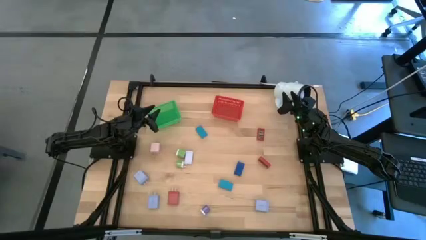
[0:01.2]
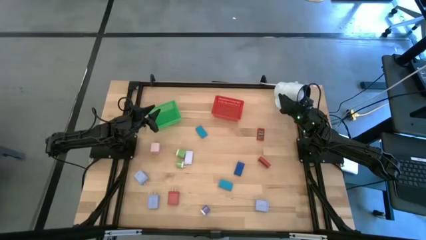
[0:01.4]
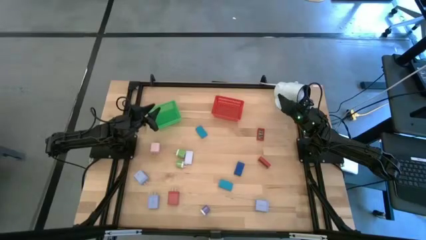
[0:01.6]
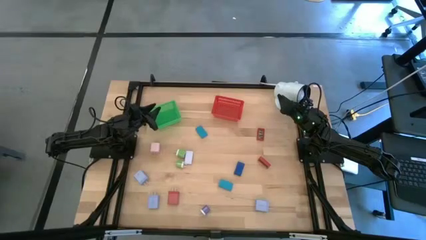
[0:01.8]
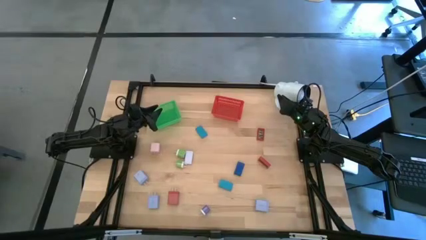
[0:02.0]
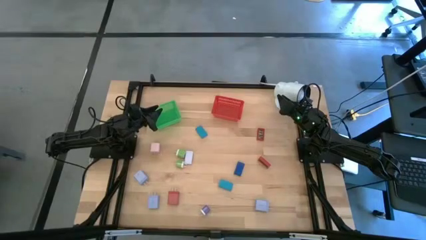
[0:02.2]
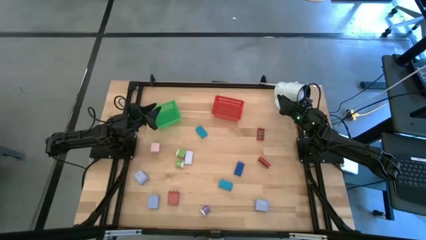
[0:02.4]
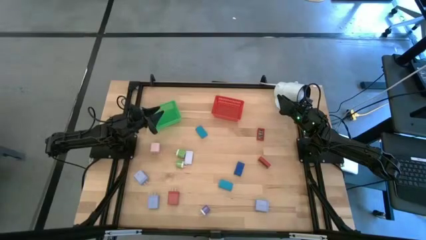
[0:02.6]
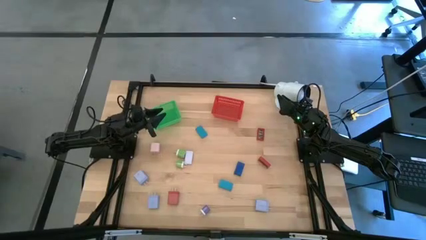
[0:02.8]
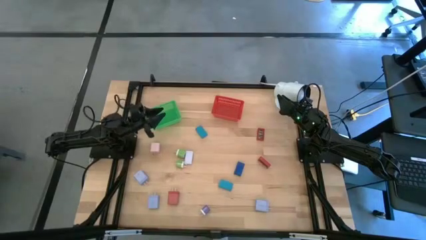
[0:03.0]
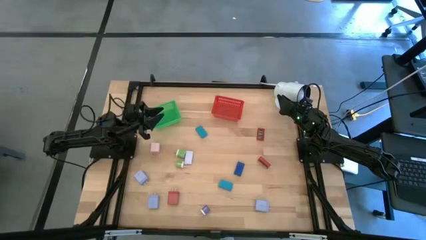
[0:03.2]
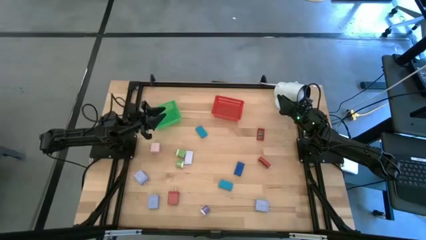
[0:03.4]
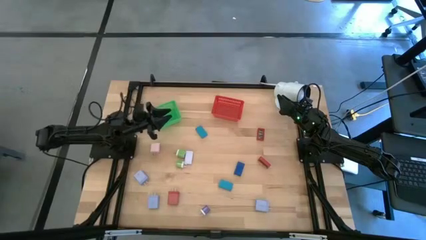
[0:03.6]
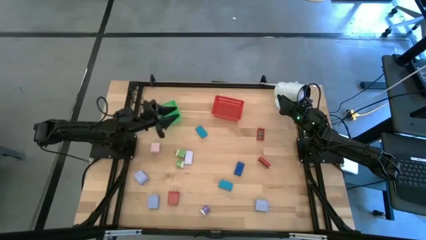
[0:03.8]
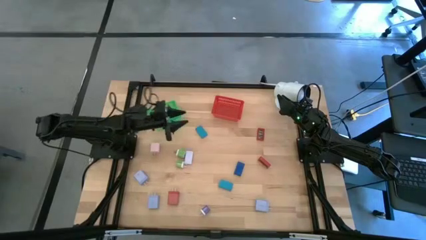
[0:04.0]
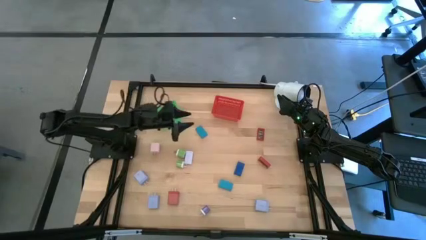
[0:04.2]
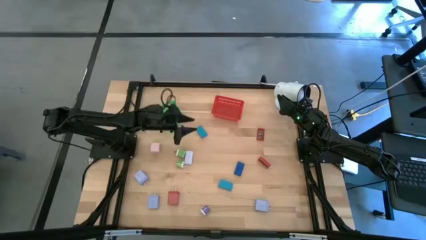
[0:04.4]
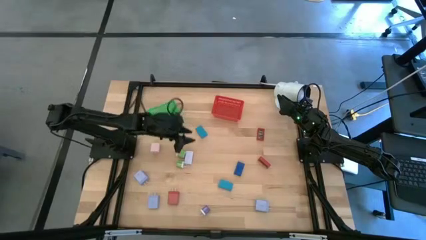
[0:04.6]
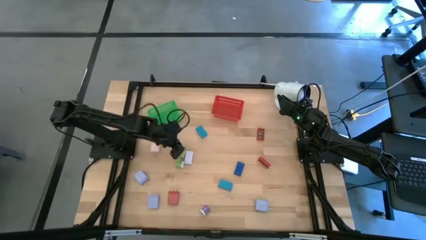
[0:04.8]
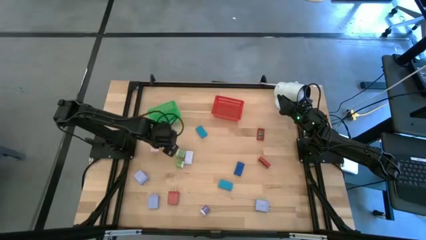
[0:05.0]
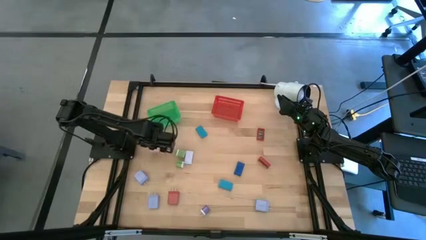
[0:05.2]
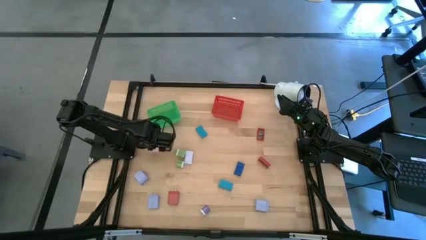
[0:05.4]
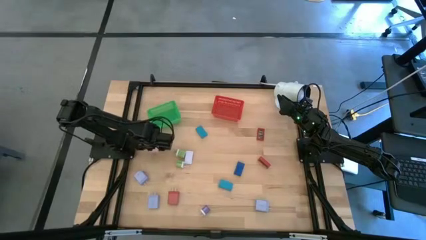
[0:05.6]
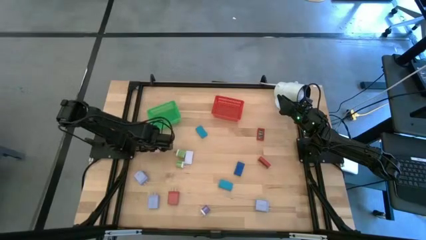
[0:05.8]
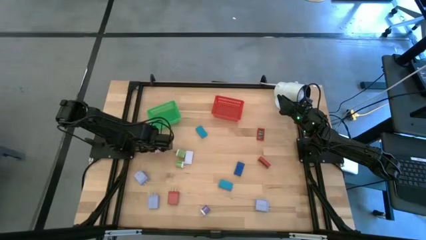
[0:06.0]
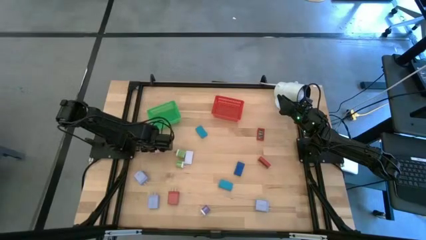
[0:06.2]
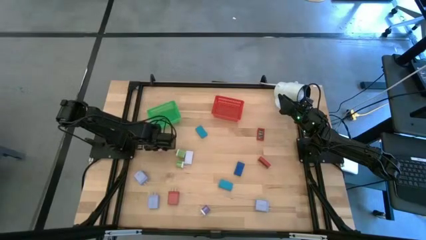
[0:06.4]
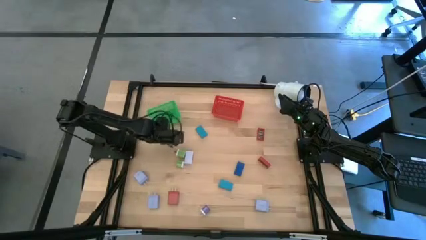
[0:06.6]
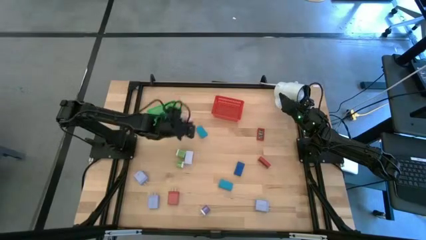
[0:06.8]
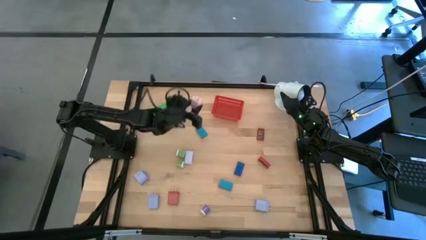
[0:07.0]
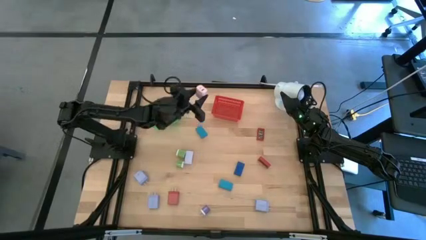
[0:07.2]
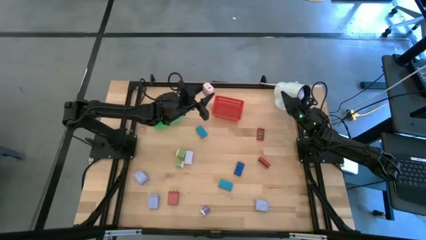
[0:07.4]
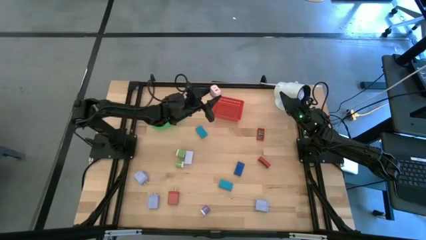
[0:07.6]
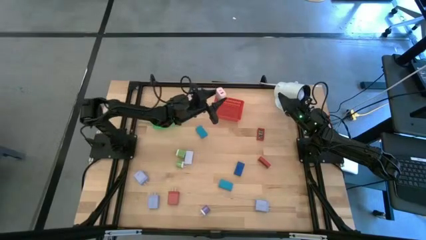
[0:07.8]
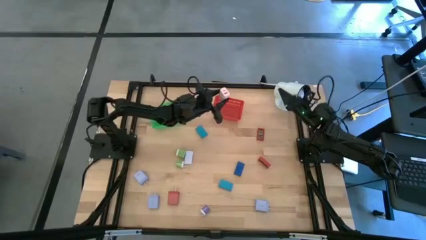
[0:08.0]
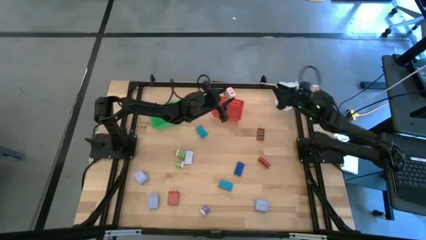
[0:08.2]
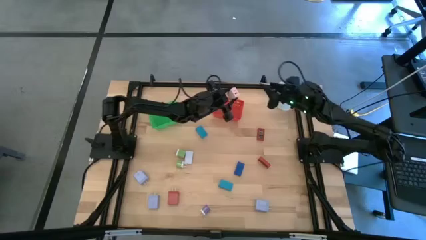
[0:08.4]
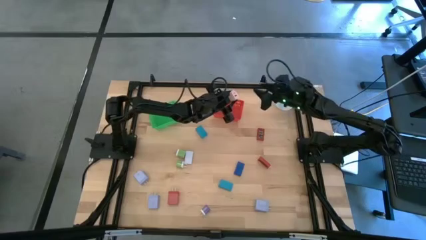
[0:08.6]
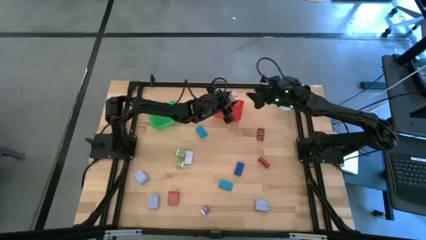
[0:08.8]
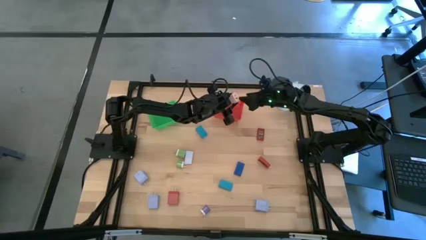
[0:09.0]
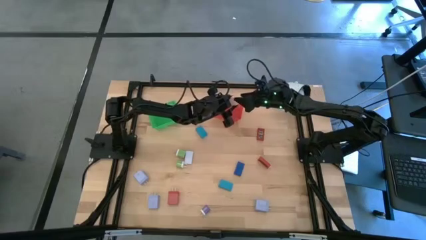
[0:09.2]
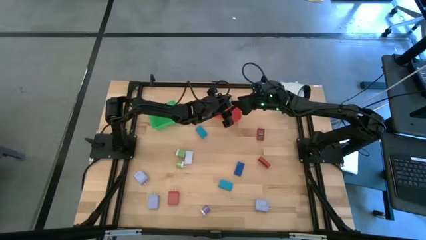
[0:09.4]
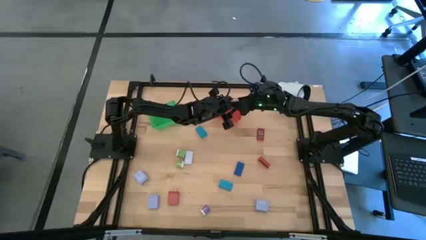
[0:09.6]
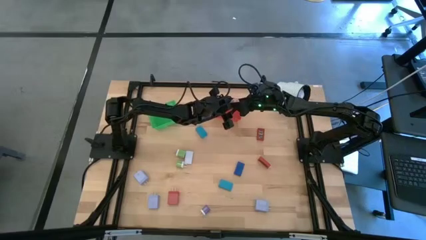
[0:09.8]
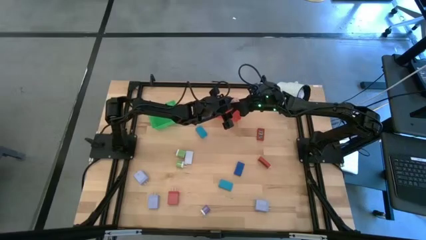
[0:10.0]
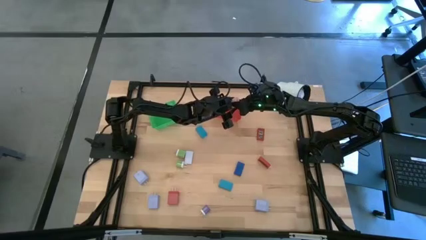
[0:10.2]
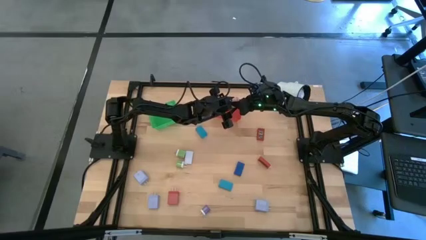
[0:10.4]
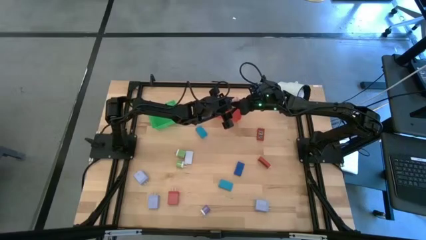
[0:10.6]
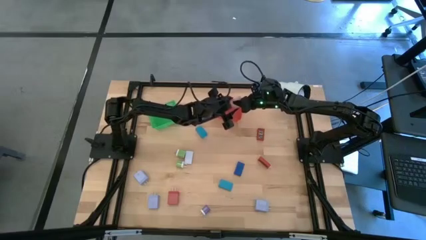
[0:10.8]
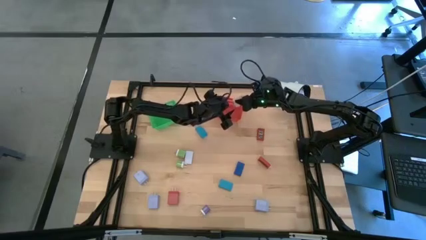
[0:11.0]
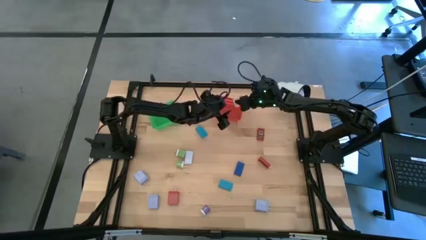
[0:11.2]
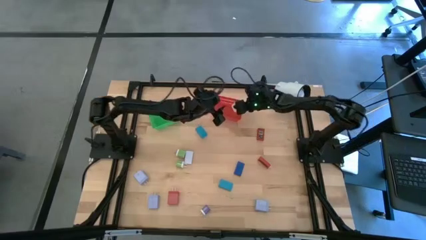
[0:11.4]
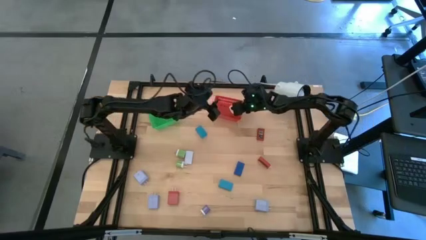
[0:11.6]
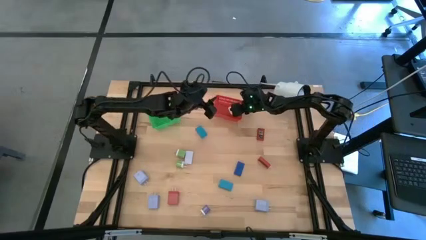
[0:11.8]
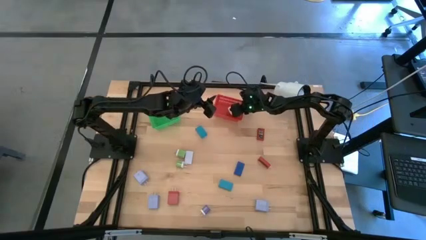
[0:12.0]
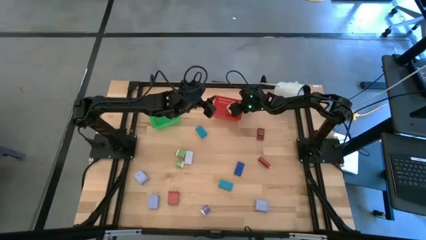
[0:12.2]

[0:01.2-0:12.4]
Task: Pick & Place Office items
Put the pink charger adapter into the red bin

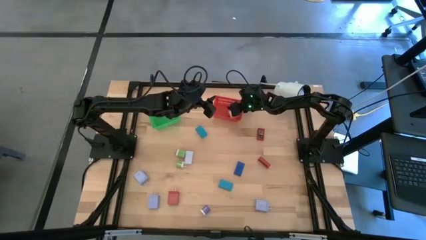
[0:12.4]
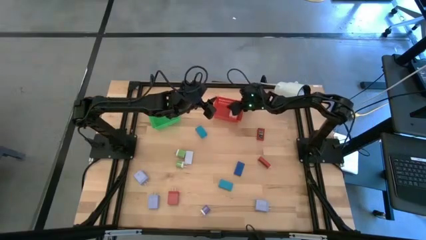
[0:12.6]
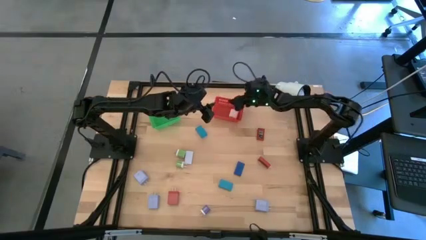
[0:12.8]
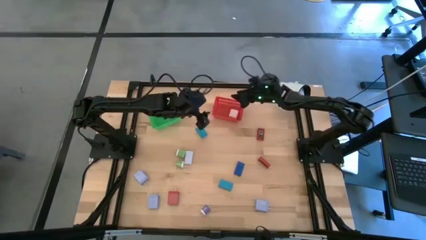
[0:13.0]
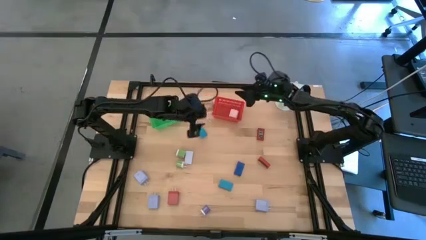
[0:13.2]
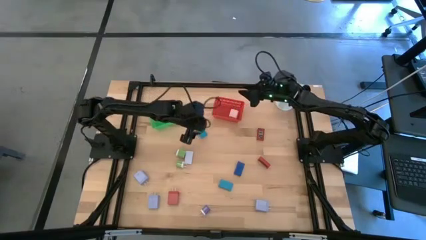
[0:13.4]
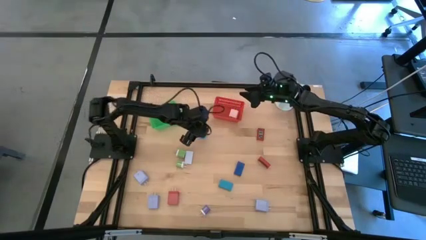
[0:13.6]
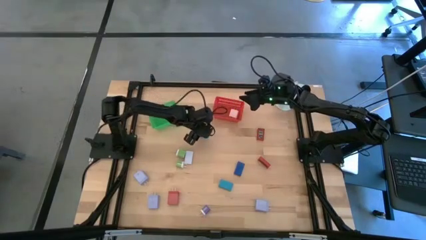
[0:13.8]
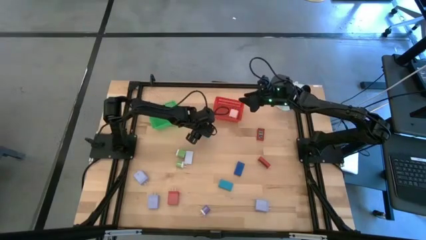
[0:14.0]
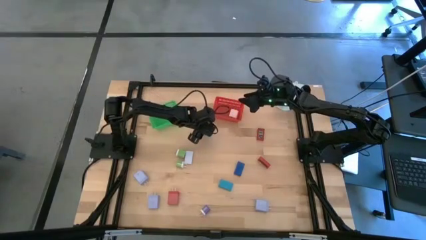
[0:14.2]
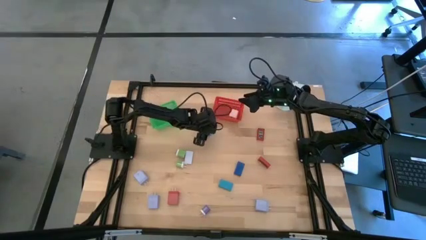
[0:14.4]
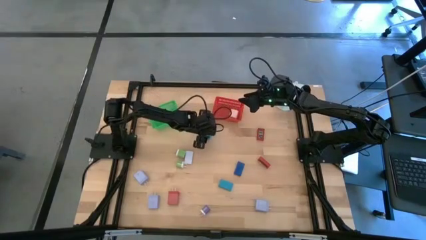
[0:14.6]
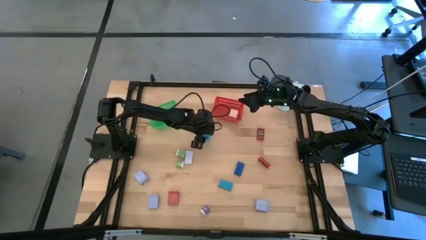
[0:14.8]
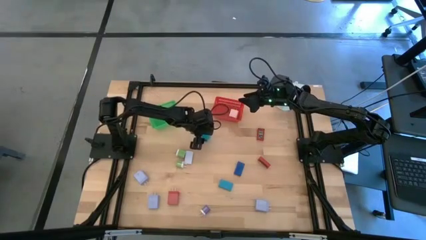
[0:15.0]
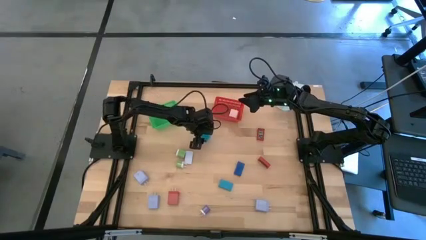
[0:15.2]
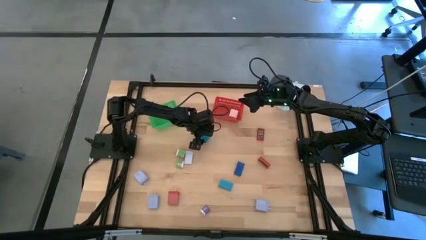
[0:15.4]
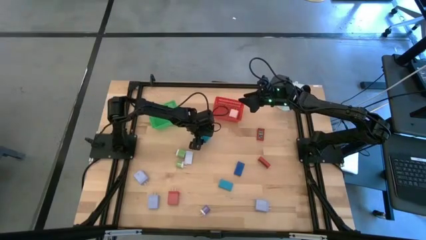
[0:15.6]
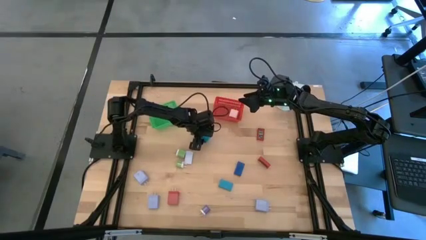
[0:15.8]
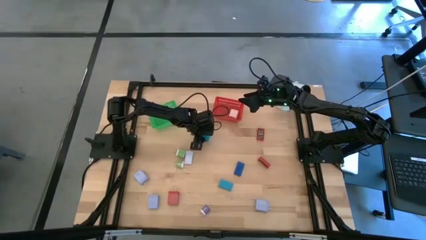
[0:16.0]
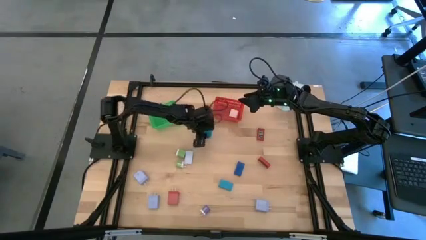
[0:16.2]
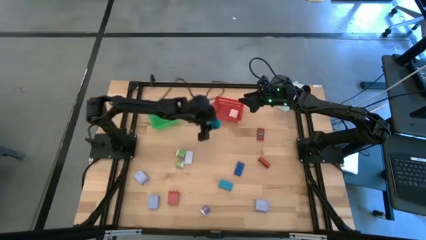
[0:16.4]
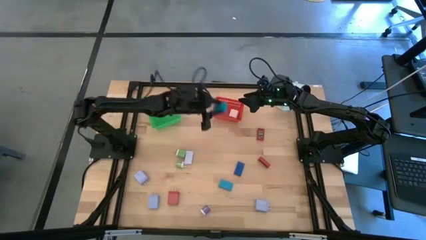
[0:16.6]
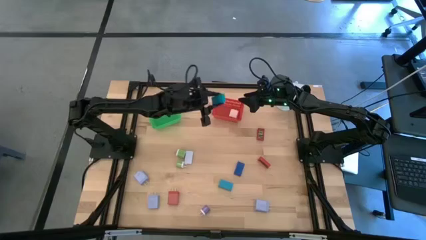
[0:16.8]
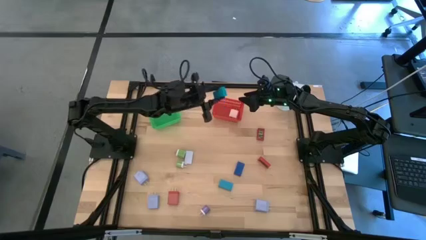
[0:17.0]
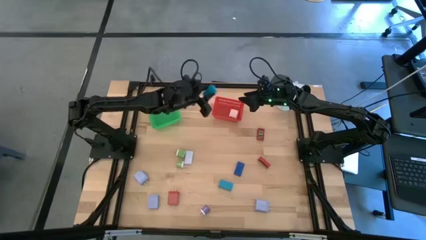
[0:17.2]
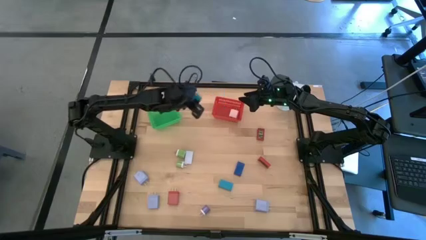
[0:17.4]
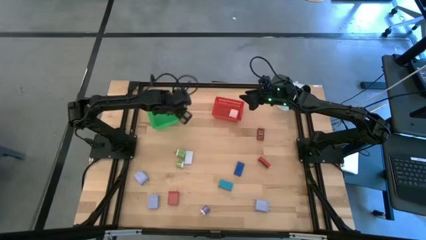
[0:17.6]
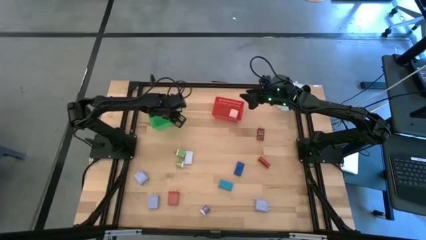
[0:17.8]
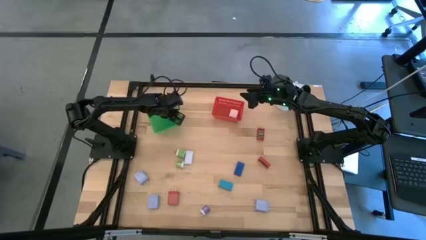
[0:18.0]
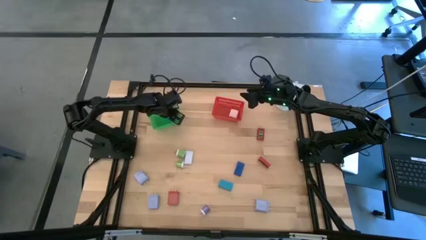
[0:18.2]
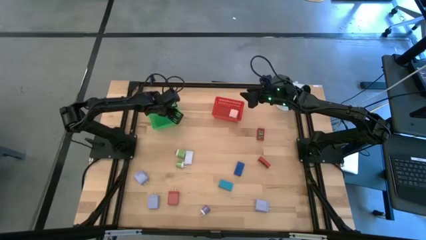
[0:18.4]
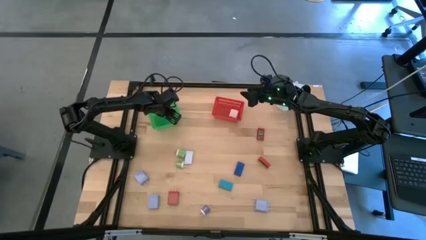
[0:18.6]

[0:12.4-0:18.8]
Put the top blue digital clock into the green bin
